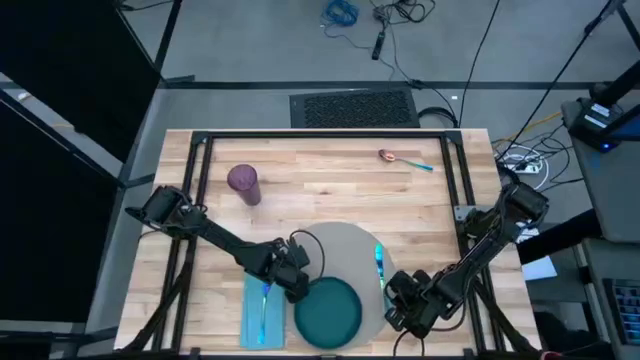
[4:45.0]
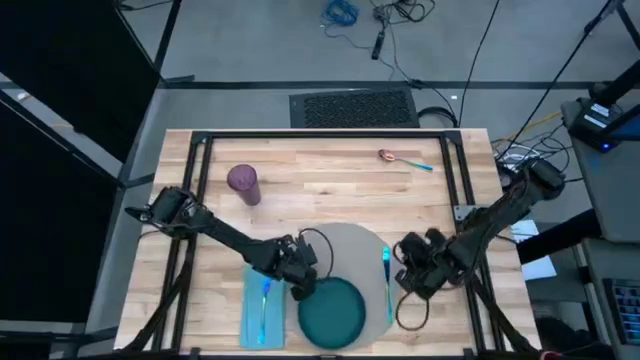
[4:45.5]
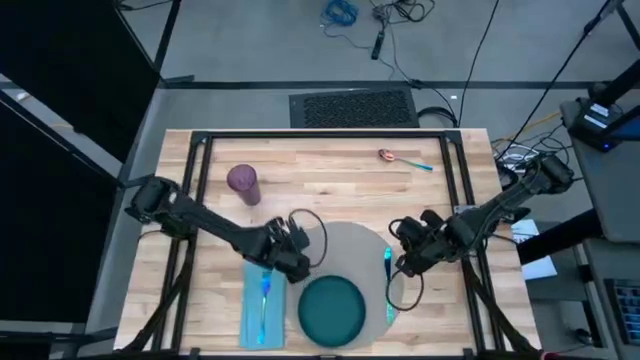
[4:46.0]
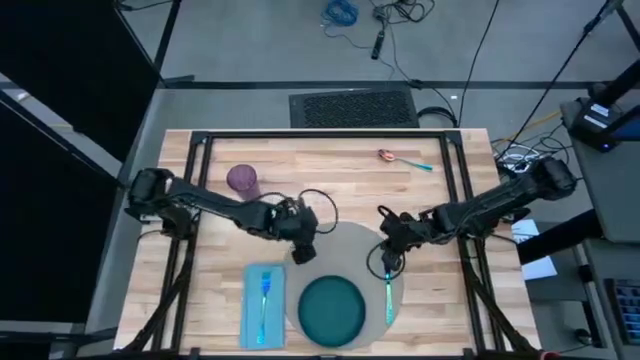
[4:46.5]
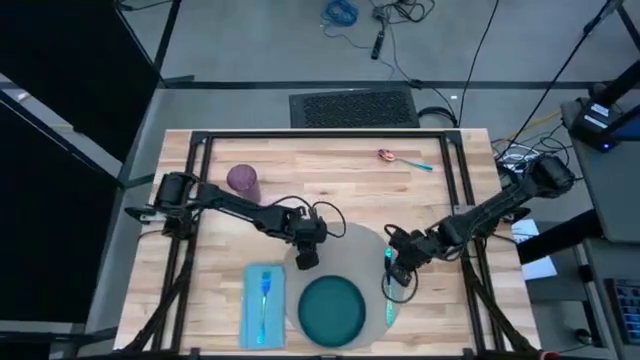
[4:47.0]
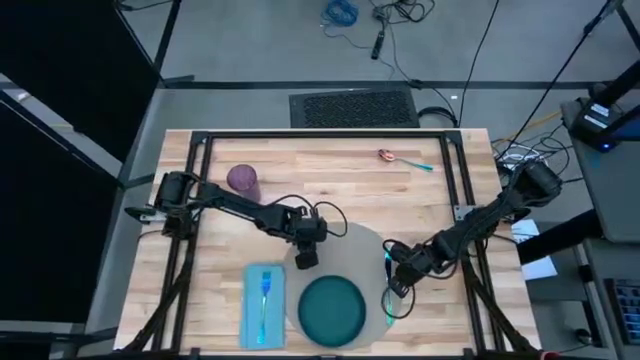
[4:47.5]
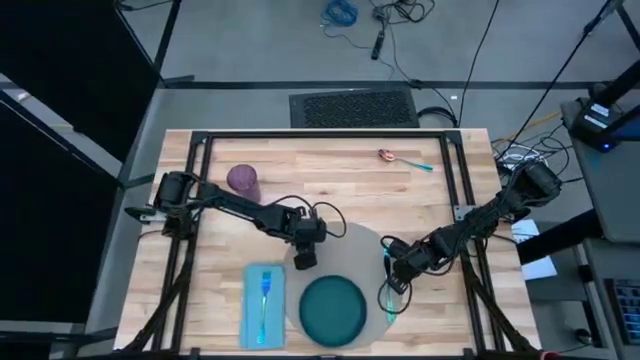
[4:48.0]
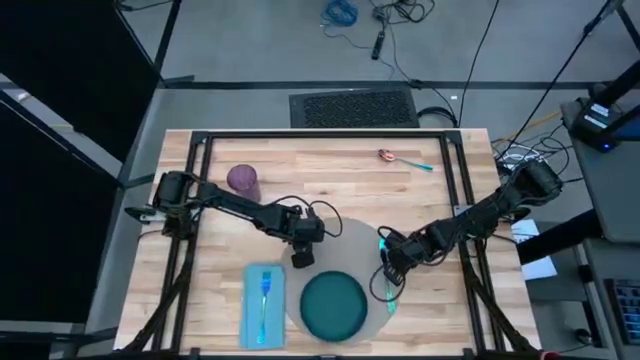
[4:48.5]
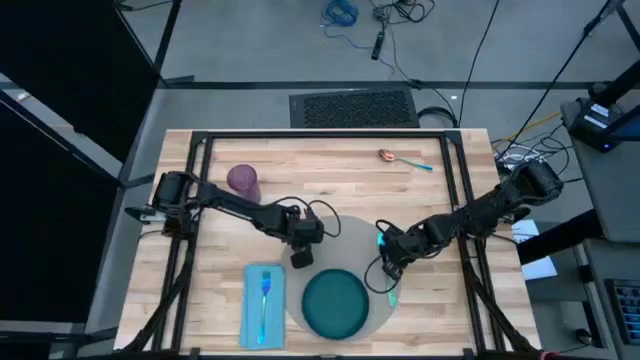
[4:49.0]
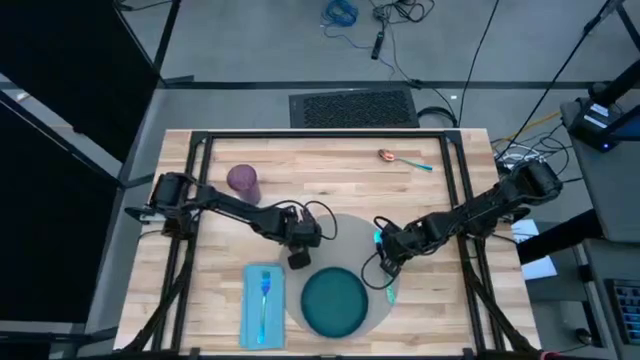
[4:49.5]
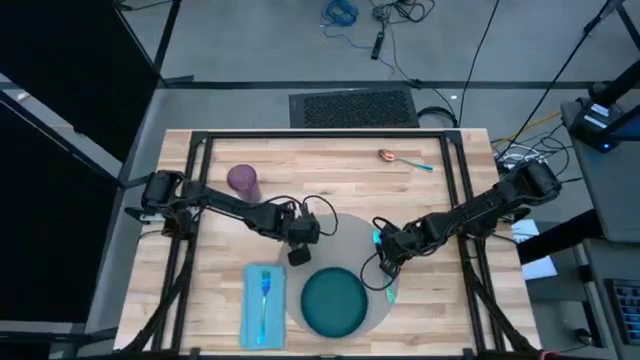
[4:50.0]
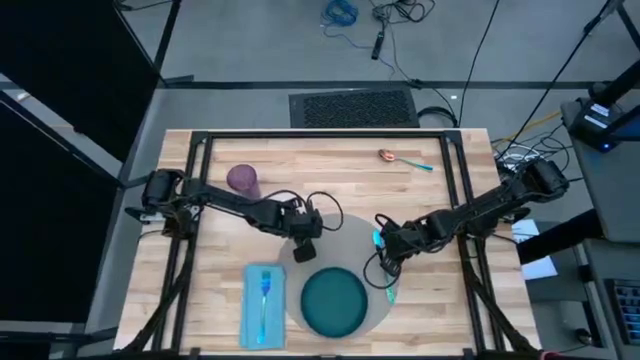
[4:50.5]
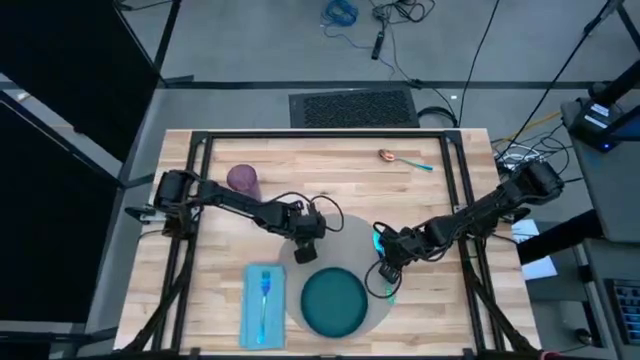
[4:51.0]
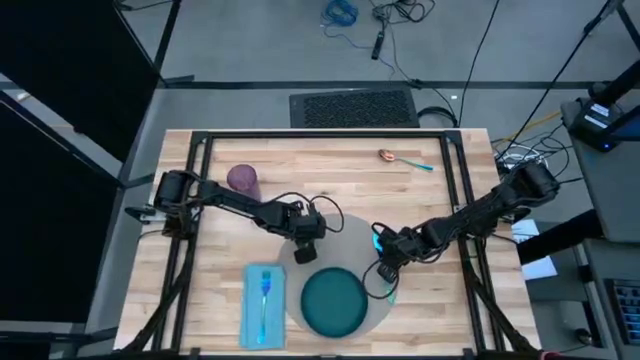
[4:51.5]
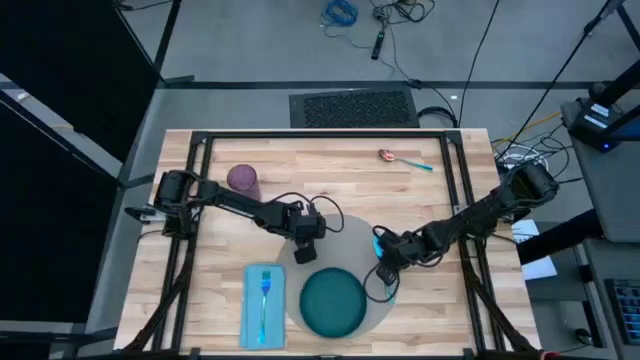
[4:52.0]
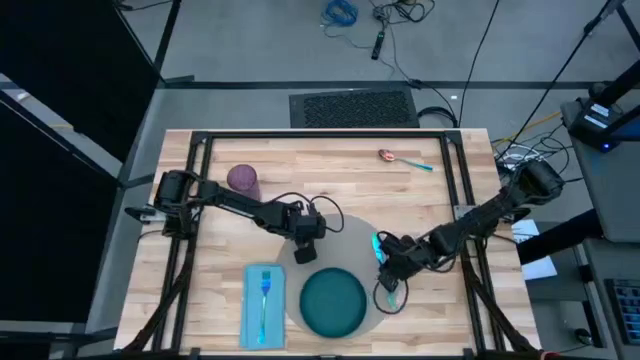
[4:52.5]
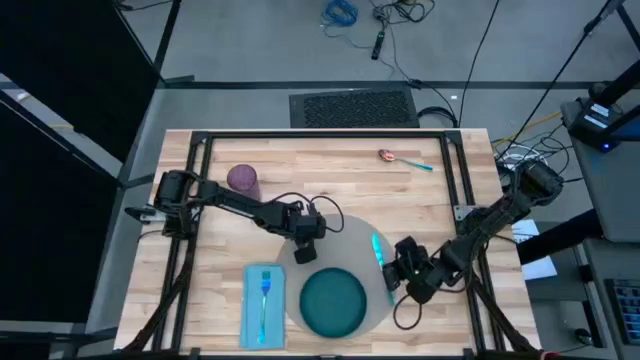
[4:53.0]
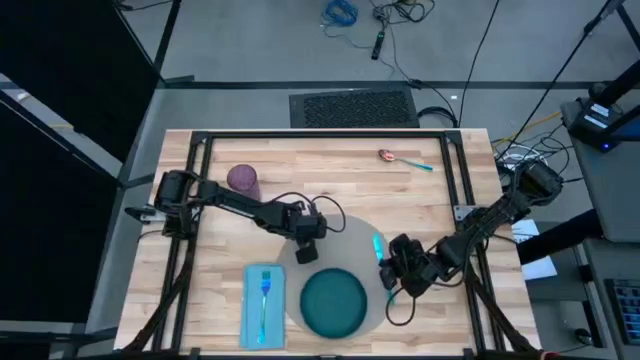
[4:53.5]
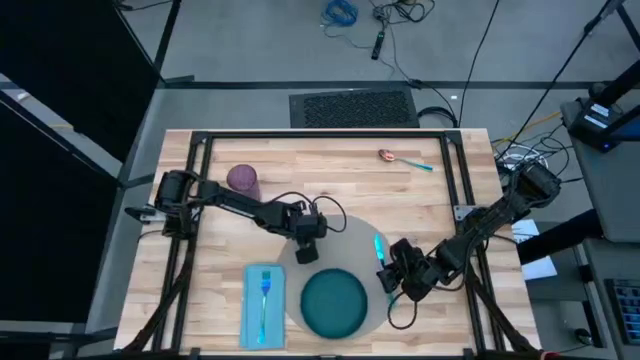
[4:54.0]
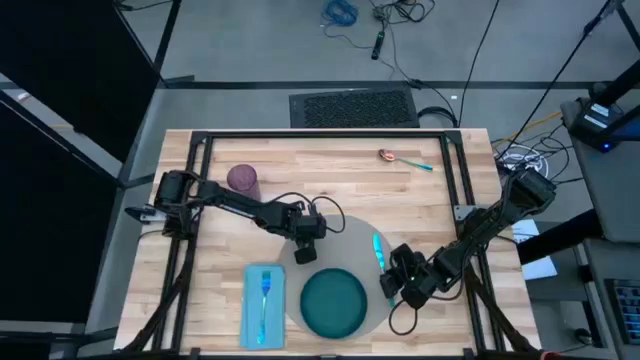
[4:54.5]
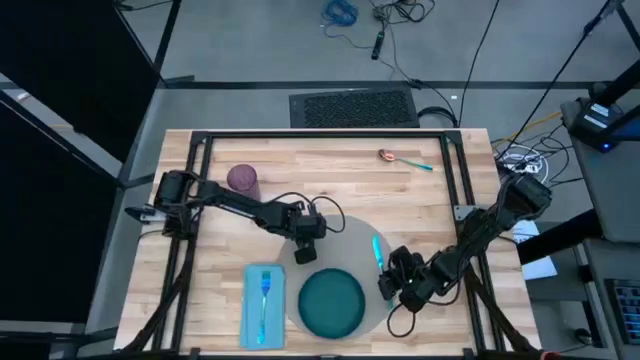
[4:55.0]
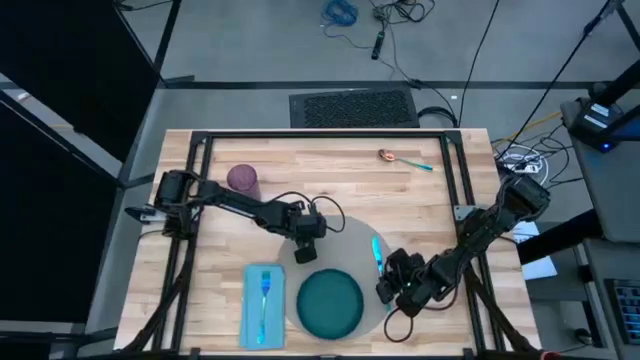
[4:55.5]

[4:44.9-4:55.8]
Task: Set table place
Adjust the gray mat

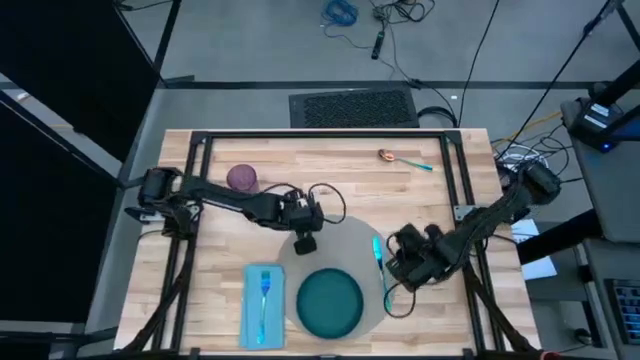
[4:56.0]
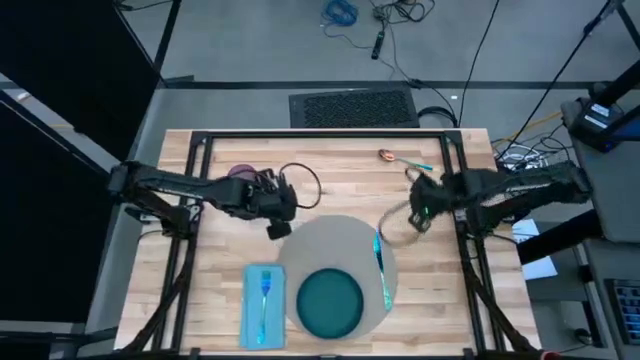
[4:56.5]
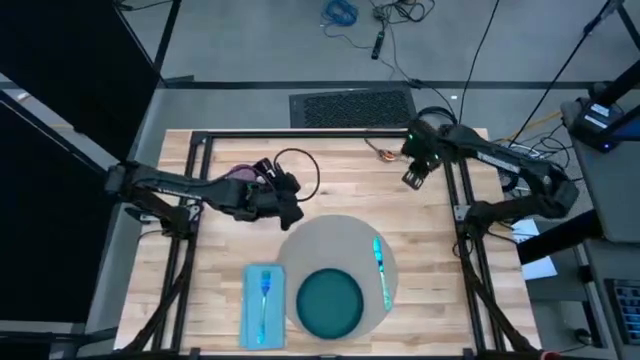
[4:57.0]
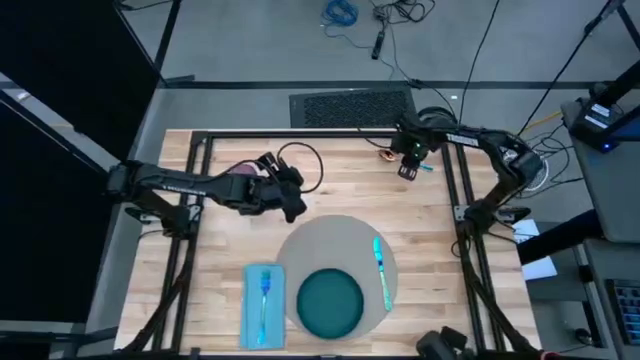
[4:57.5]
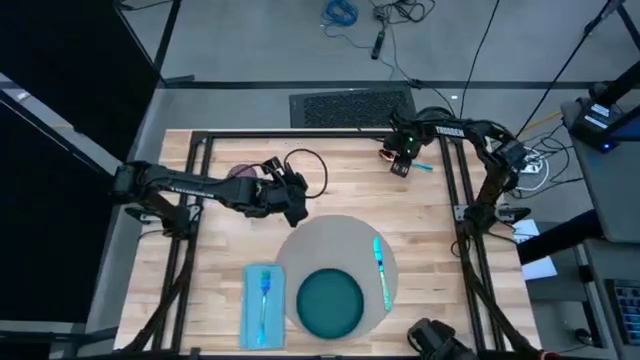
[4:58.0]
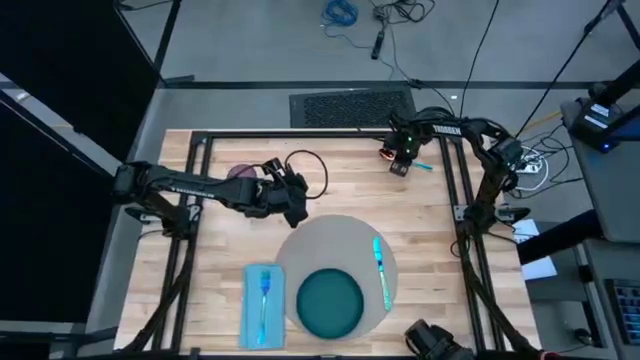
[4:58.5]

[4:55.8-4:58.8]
Move the iridescent spoon to the bottom right of the table

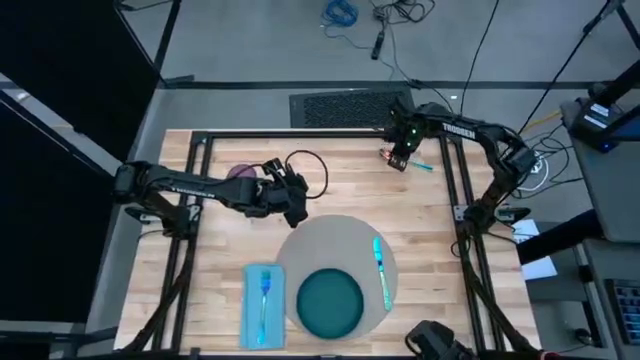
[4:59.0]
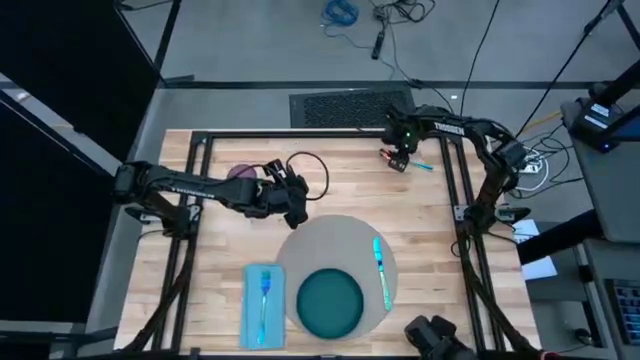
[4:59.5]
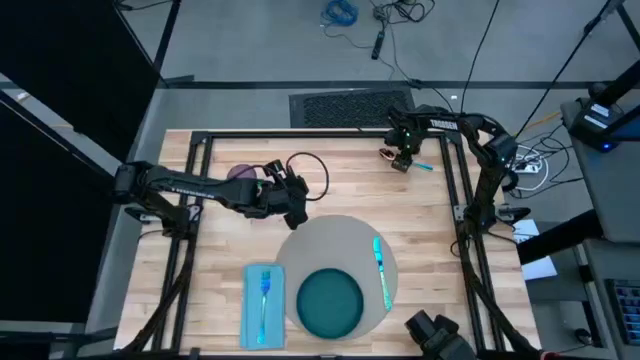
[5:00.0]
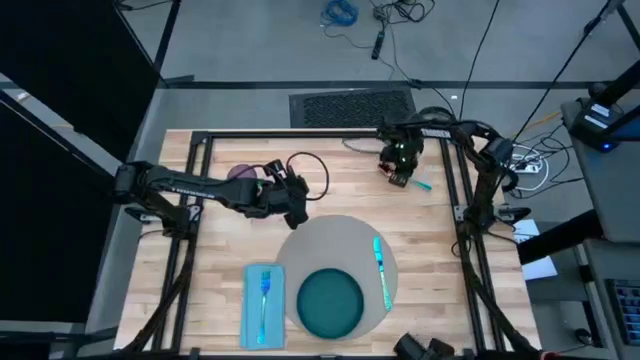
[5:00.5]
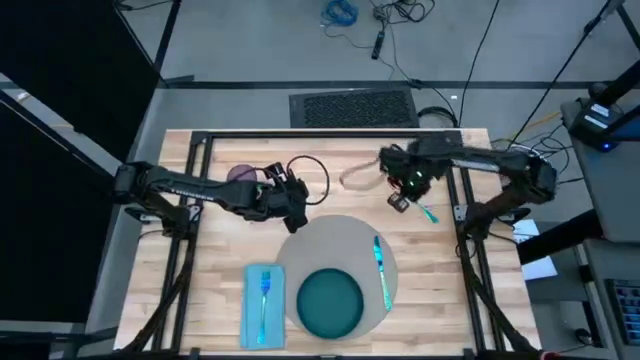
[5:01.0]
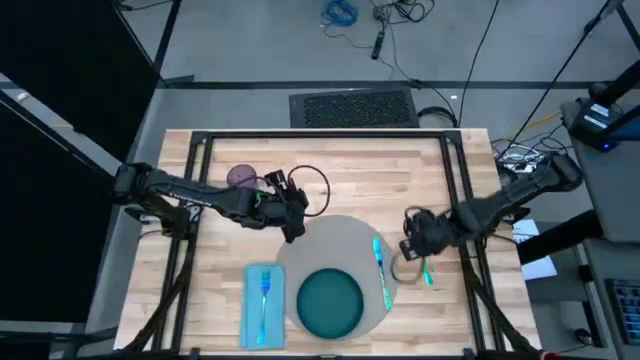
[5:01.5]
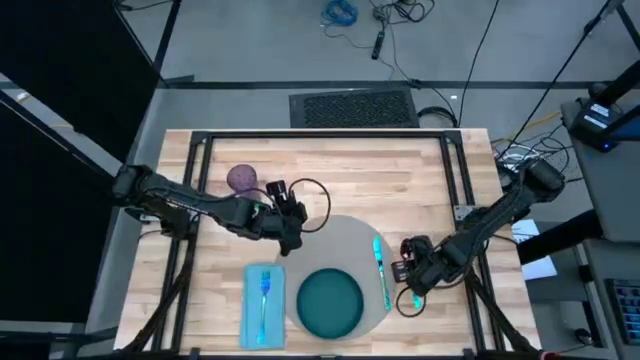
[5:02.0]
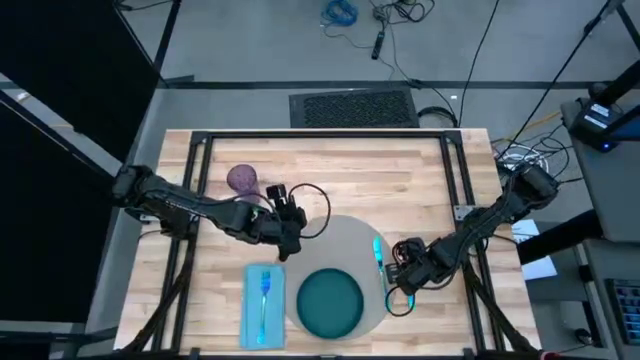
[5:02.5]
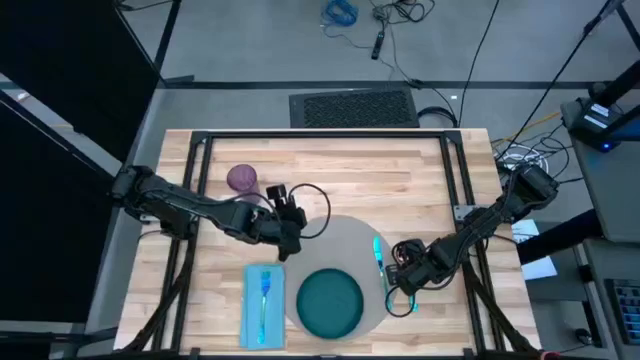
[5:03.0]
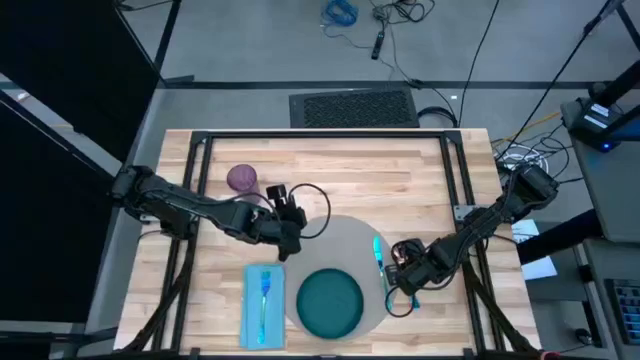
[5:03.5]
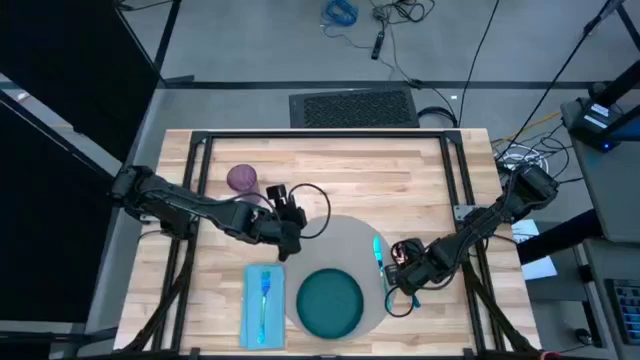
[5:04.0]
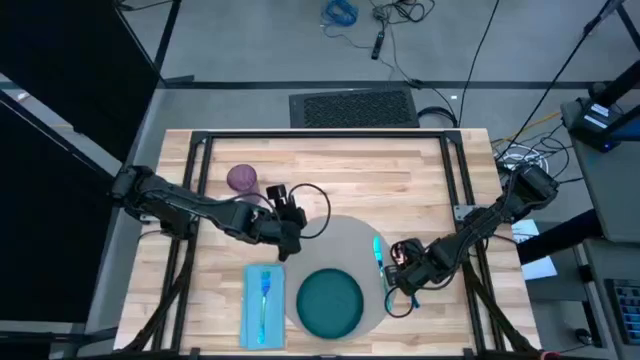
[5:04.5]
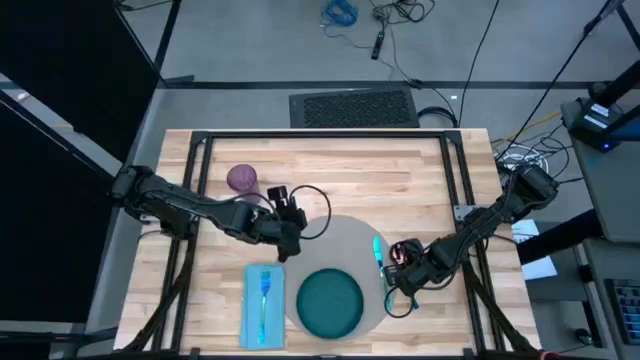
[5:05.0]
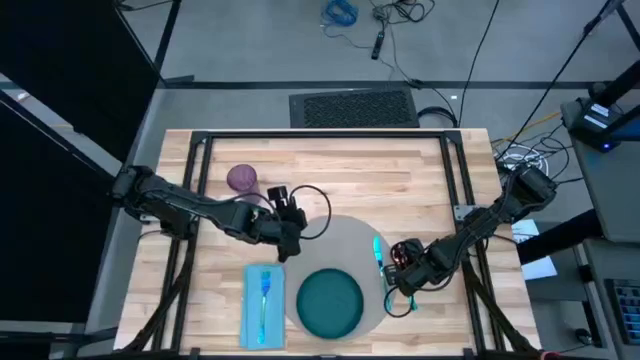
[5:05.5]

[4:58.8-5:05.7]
Move the iridescent spoon to the bottom right of the table
